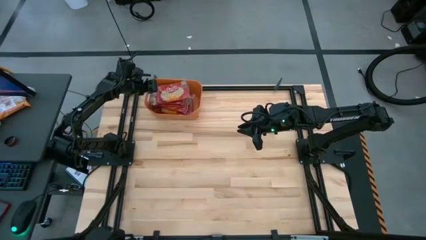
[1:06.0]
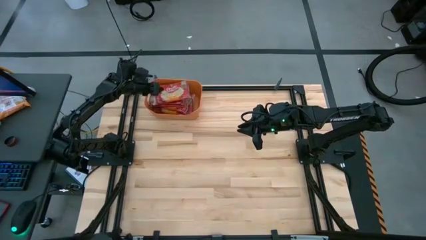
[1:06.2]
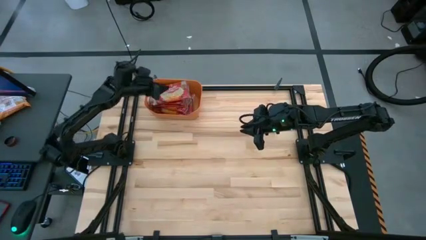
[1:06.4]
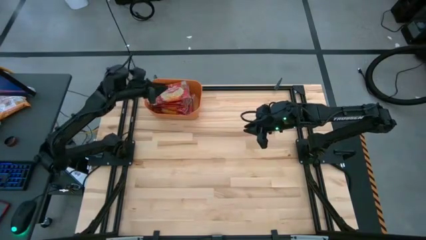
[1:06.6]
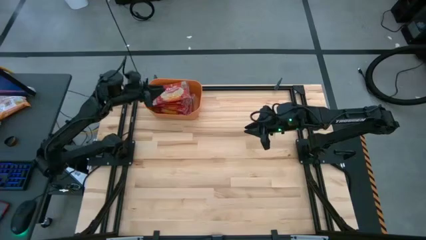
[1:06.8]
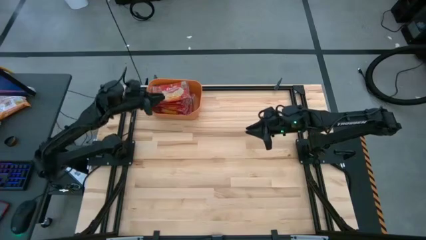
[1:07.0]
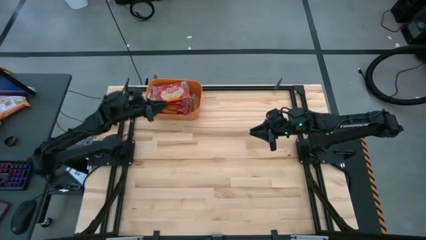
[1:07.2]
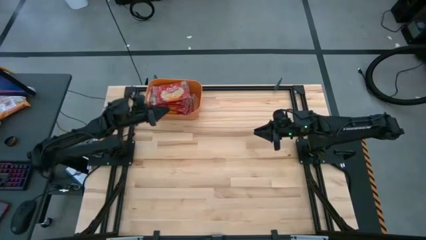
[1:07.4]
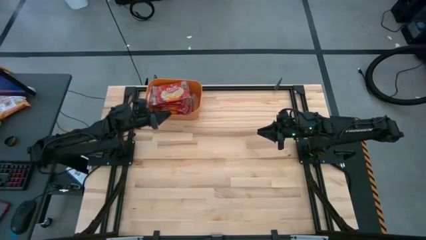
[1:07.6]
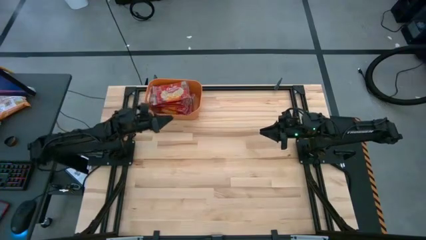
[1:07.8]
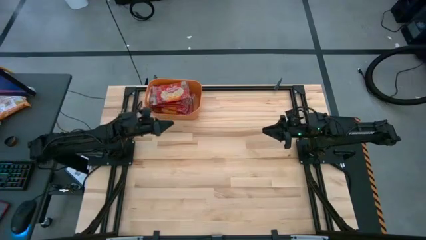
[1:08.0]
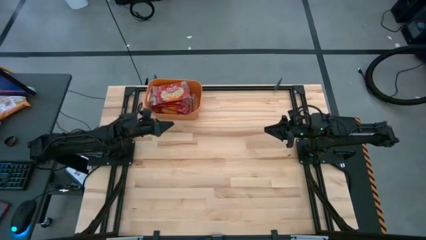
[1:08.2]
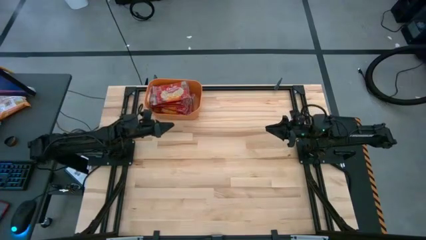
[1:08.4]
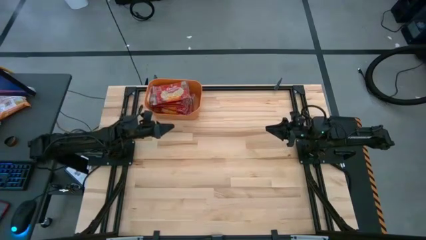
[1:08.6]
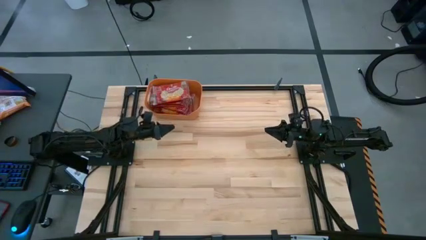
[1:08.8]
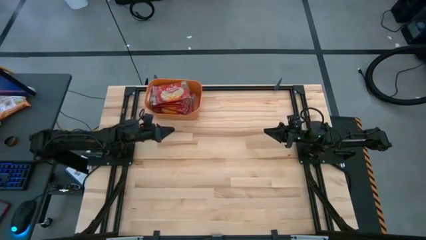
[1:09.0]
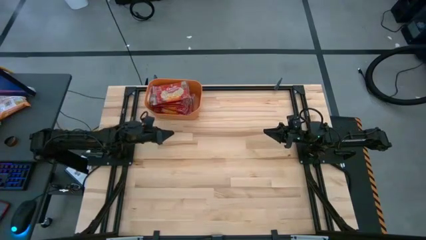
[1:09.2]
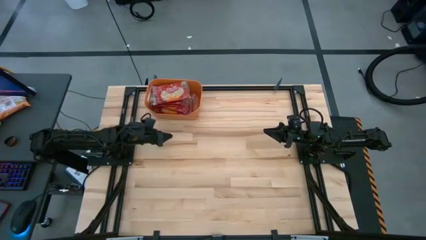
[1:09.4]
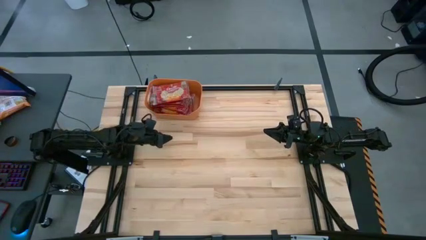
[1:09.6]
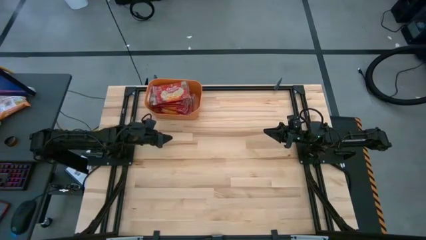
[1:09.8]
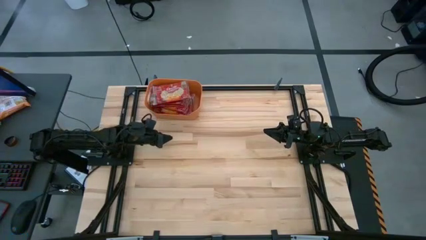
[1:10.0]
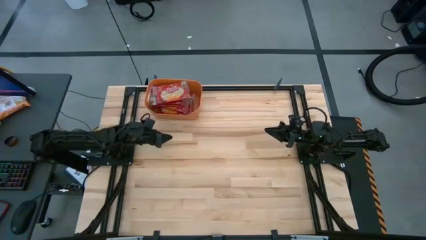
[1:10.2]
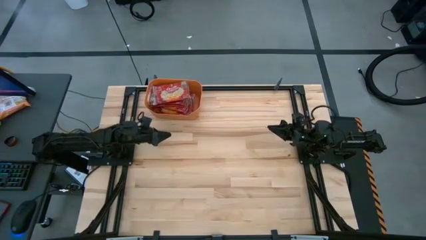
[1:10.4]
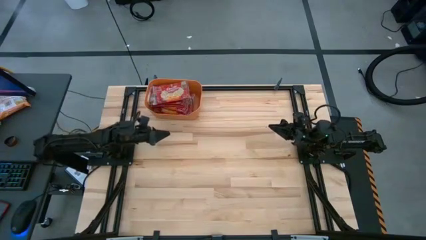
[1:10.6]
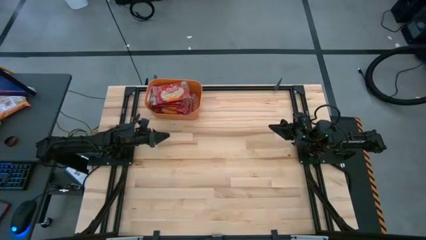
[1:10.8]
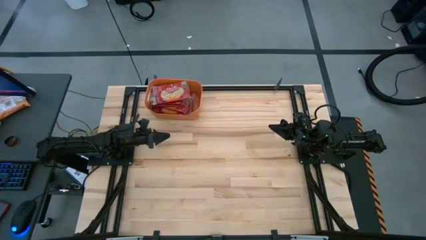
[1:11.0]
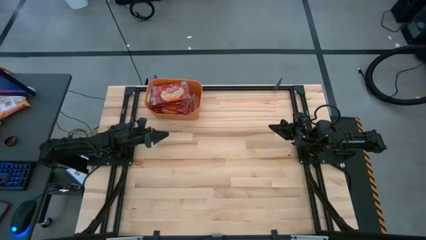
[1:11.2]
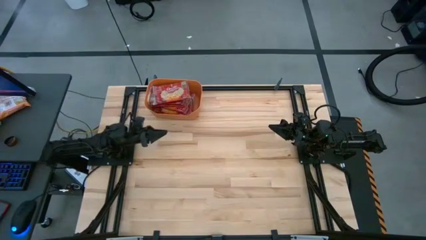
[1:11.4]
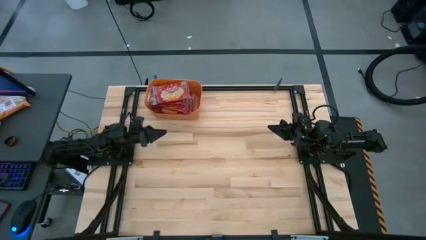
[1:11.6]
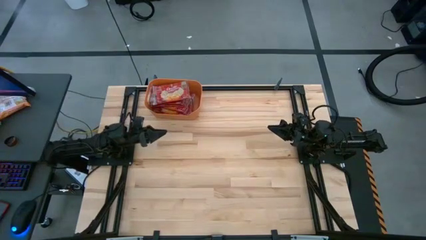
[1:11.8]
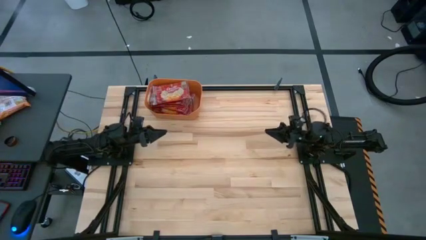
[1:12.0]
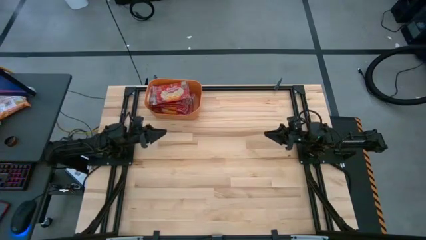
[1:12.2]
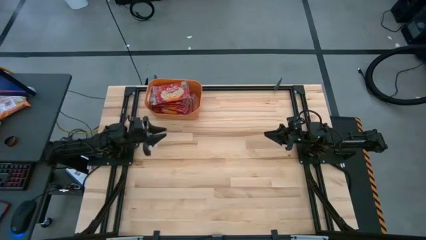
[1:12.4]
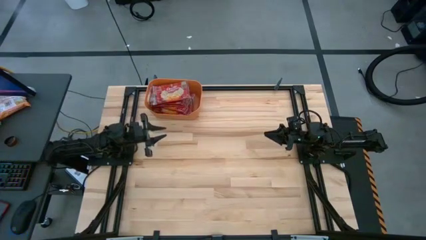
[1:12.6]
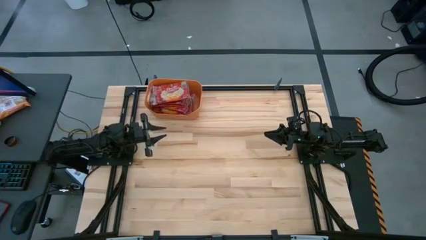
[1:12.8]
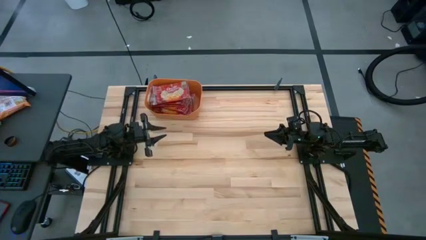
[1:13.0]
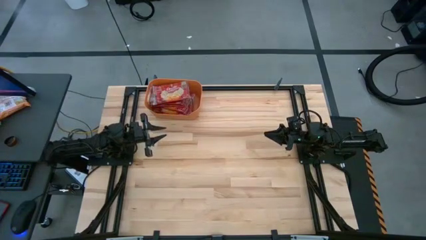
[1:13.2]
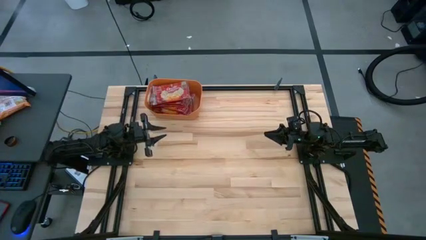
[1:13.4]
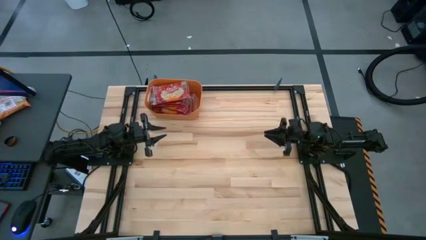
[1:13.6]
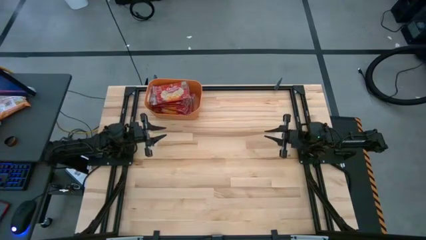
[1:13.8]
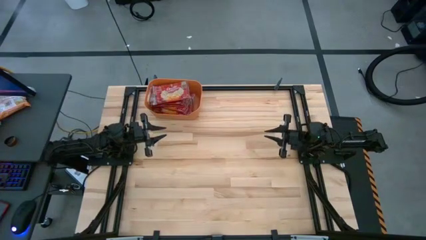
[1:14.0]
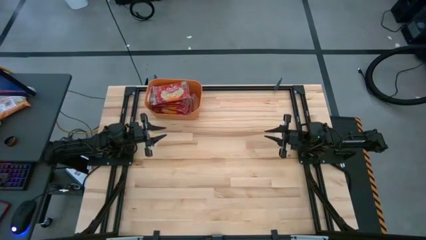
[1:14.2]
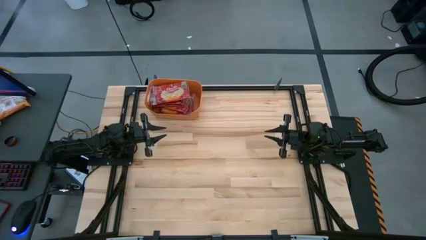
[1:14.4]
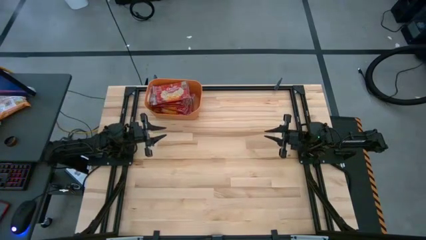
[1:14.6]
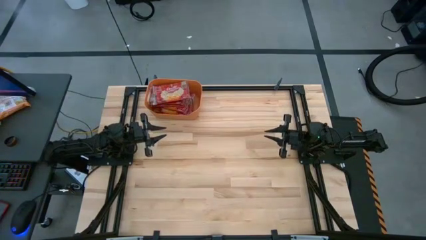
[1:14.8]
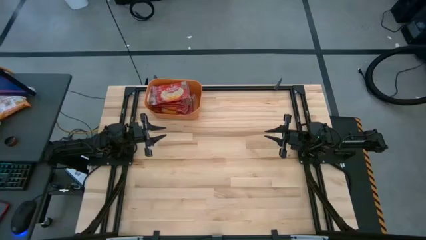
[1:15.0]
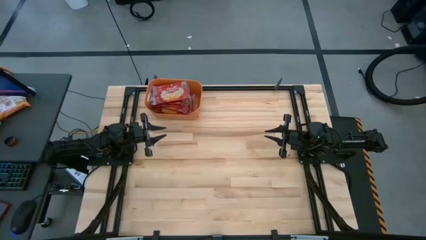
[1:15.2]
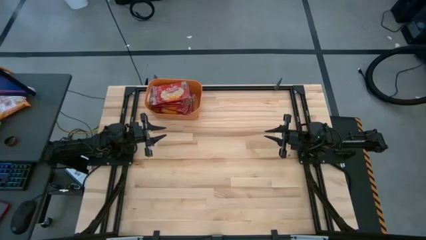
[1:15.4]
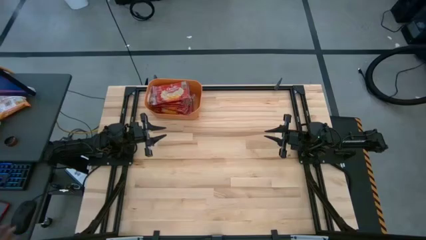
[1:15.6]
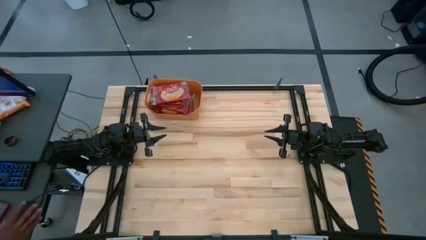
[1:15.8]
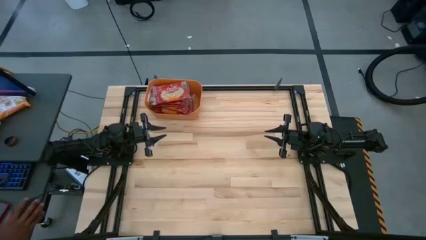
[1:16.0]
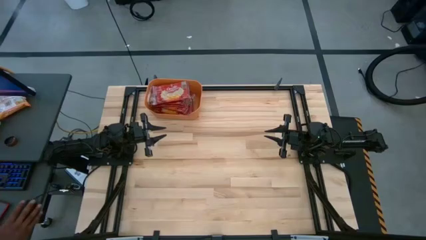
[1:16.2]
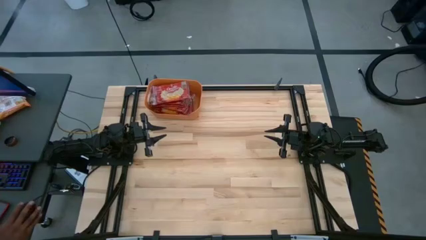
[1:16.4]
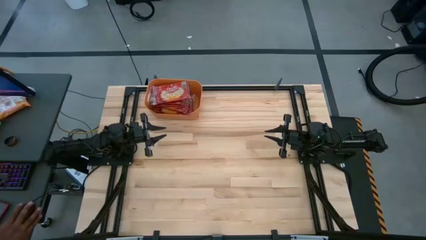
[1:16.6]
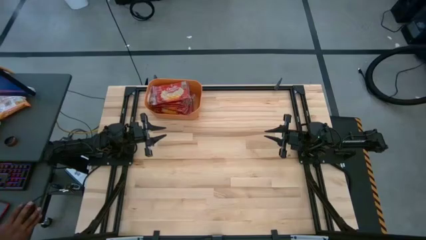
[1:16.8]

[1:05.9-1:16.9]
Task: Sort popcorn bags into baskets
Return to Home Position

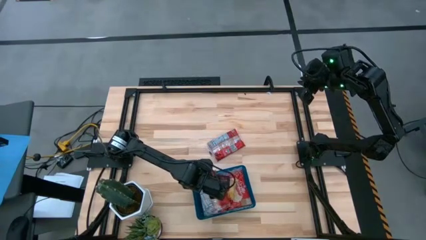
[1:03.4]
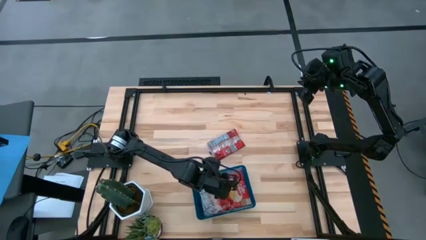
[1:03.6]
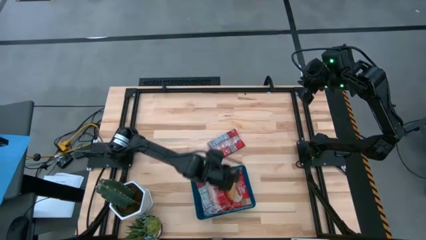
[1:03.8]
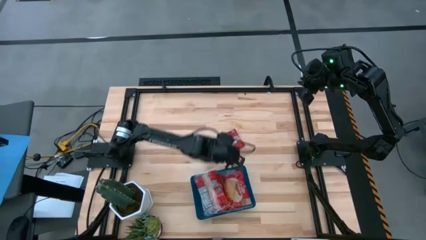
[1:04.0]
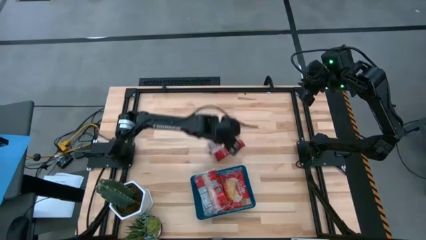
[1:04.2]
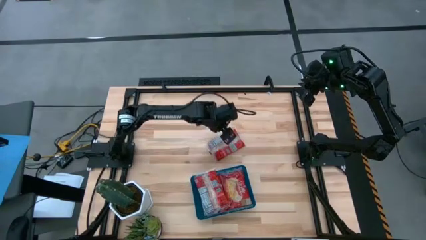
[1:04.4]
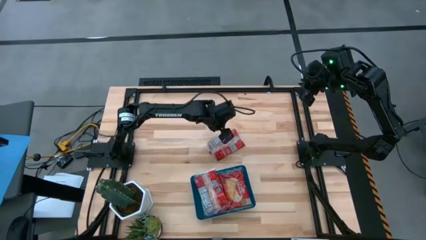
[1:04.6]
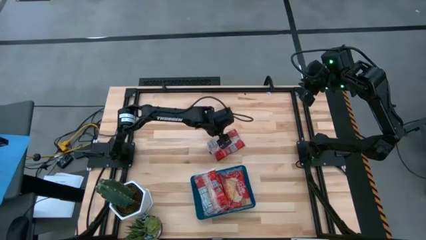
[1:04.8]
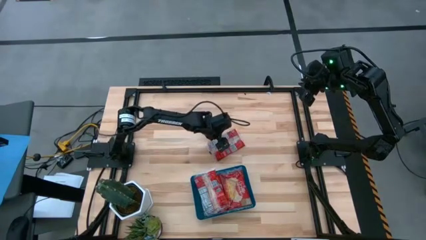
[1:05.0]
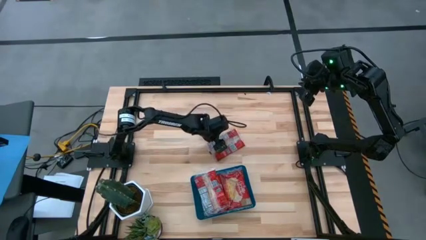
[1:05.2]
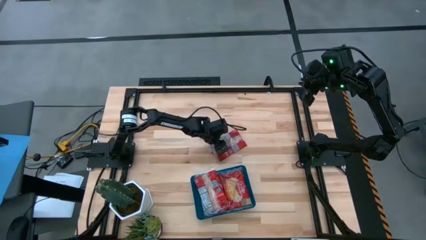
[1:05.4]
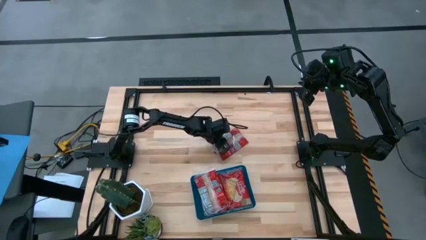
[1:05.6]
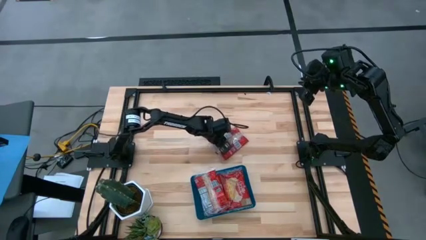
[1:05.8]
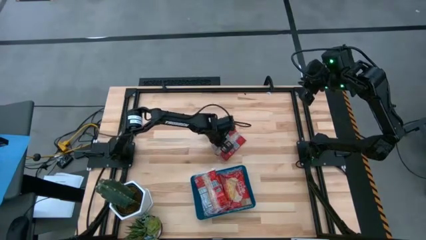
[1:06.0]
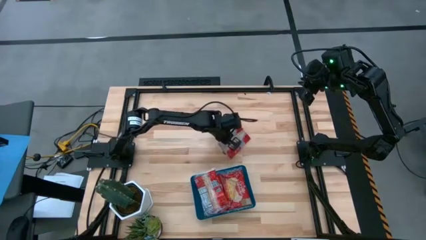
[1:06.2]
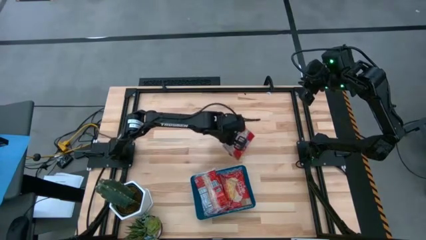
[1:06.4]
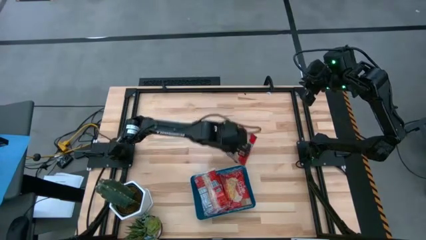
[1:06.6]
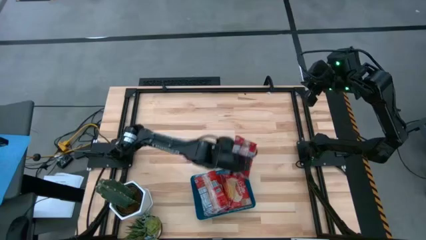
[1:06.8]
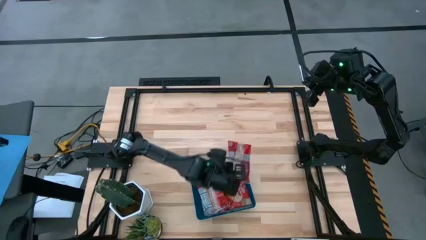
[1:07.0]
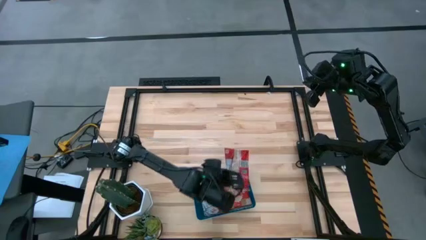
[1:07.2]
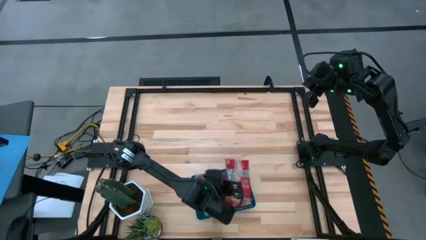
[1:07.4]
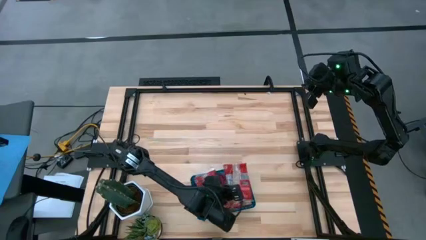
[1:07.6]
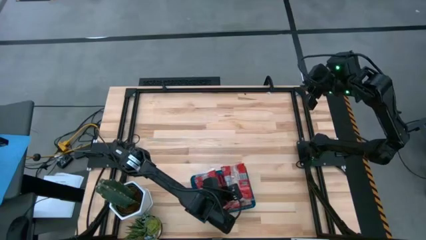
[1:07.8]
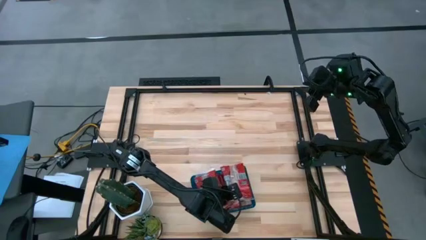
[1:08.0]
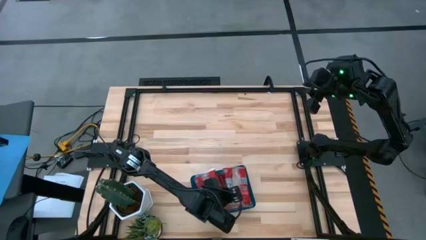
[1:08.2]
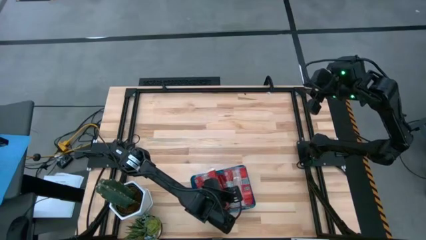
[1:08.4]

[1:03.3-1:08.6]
Task: Sort popcorn bags into baskets
Put the popcorn bag into the blue bin
